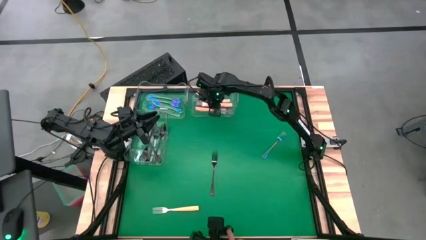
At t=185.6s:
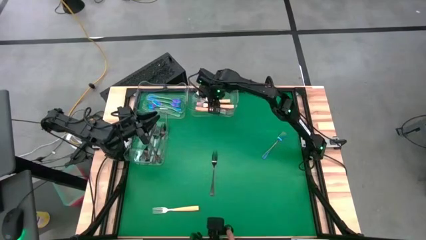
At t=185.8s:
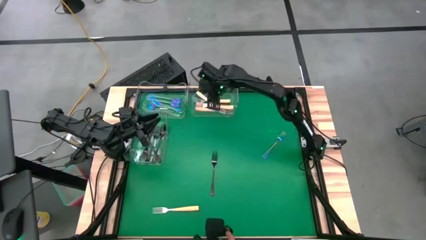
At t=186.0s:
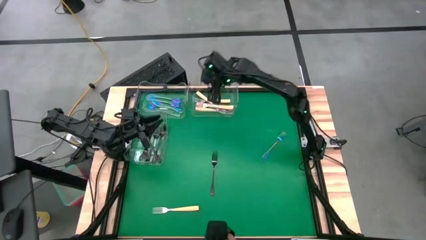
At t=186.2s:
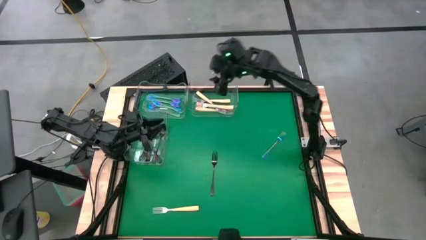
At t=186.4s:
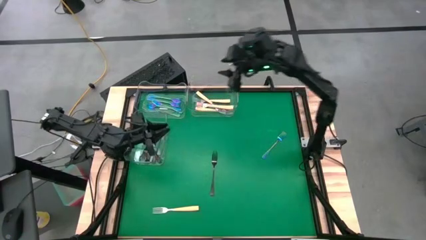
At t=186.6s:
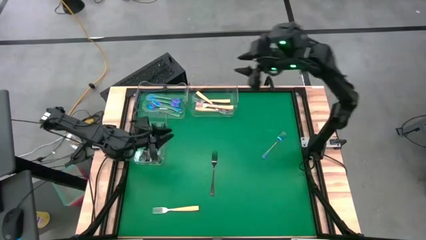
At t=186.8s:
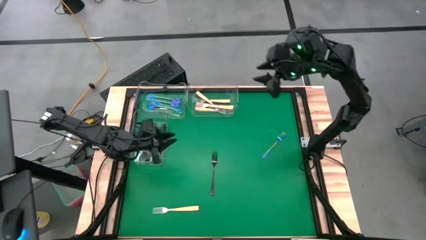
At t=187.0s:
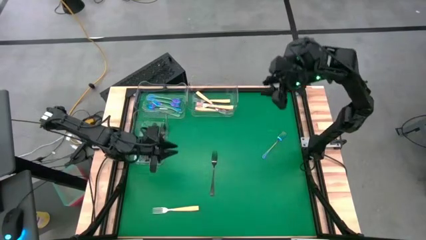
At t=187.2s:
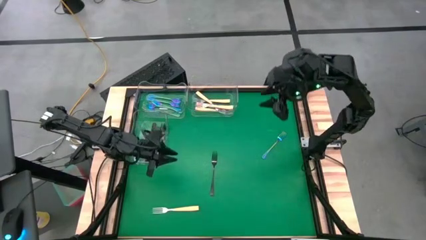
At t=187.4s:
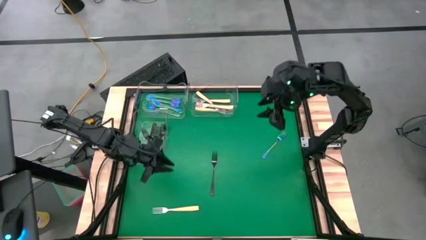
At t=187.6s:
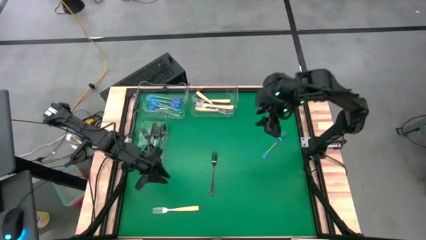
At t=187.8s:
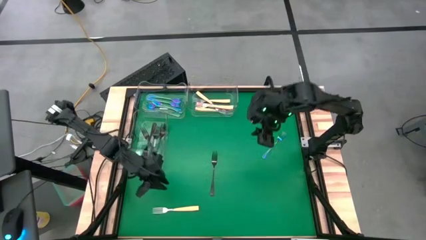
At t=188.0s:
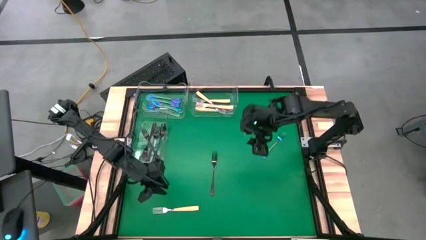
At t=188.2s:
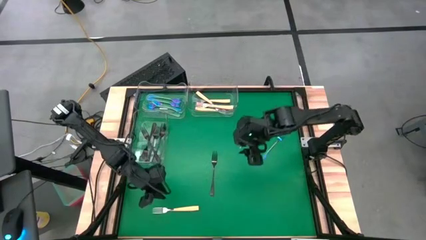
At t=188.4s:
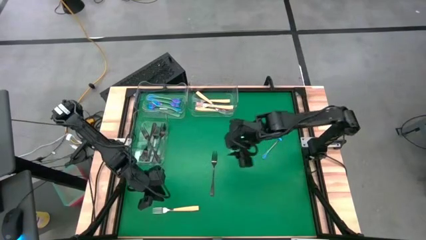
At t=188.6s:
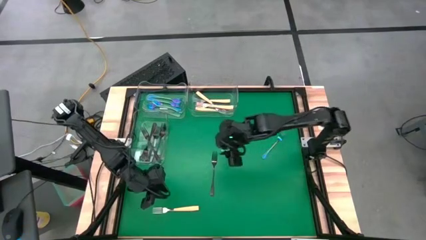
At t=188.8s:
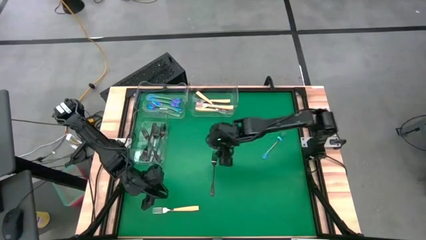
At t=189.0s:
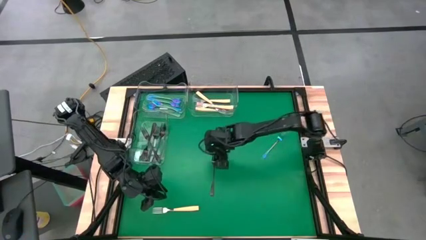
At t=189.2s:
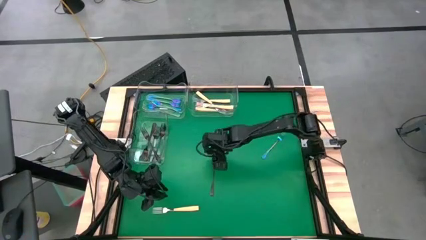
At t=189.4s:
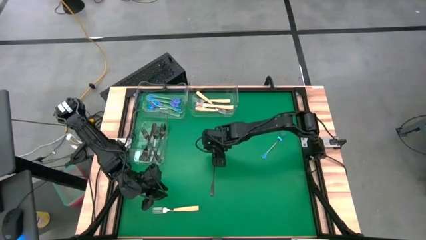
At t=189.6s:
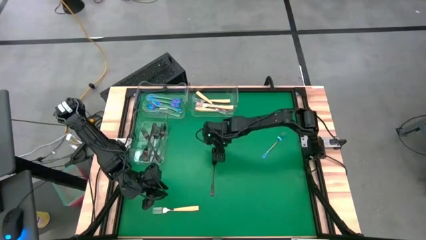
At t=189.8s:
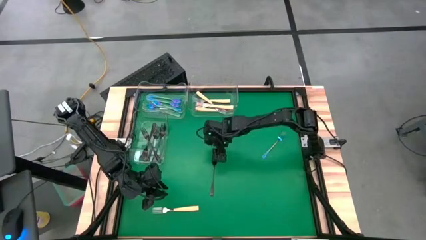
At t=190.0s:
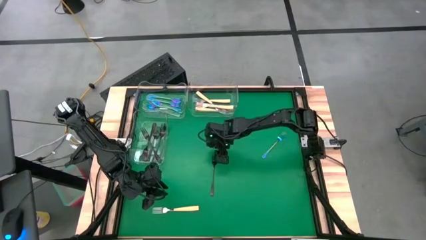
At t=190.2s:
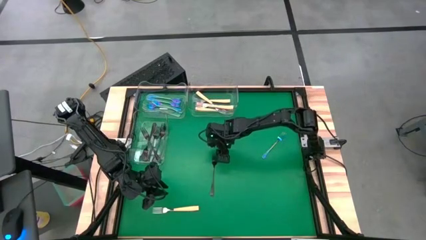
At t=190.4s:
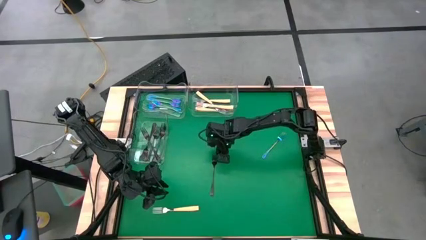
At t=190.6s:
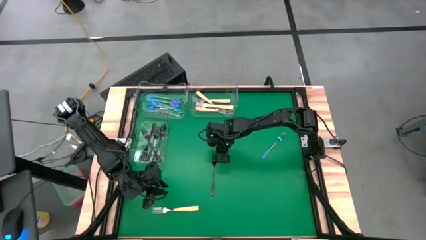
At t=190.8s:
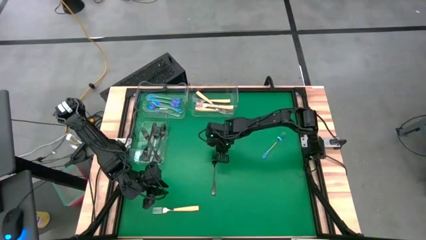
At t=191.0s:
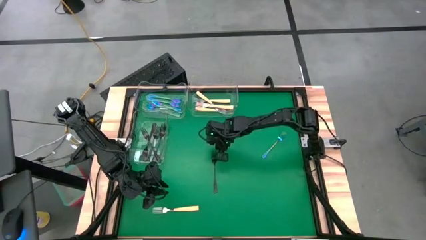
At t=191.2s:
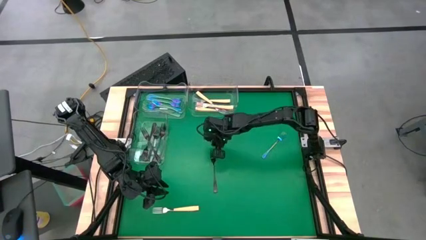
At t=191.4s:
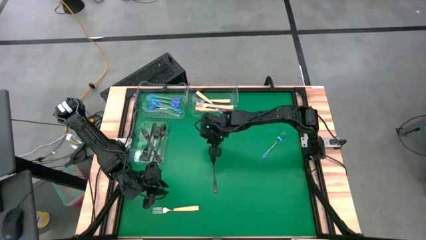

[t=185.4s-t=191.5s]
Task: Sort silverware by color (type)
Put the black fork into the middle left transparent bin

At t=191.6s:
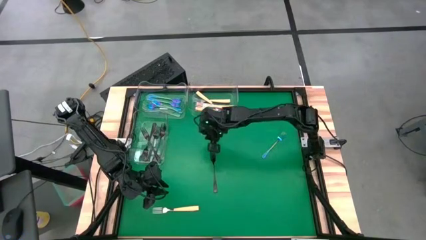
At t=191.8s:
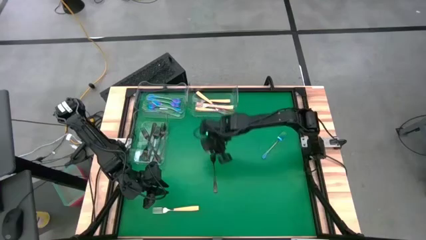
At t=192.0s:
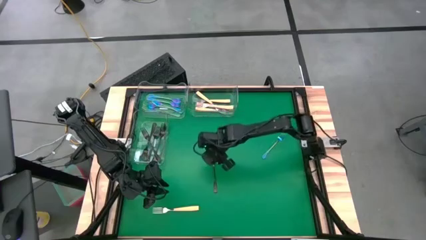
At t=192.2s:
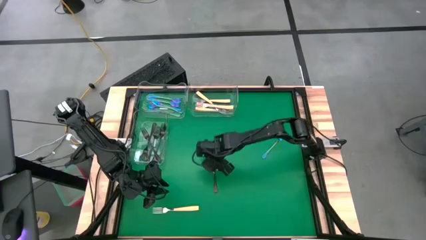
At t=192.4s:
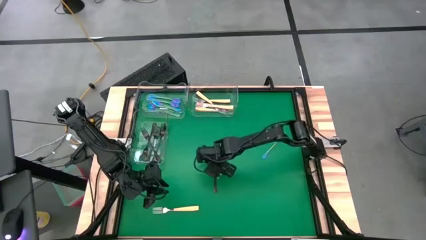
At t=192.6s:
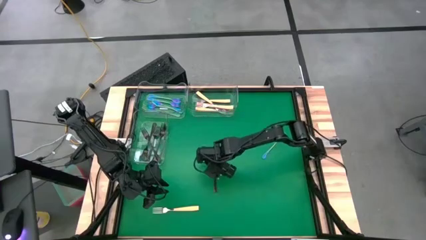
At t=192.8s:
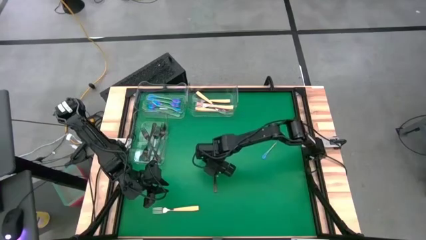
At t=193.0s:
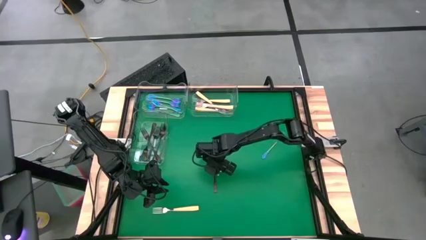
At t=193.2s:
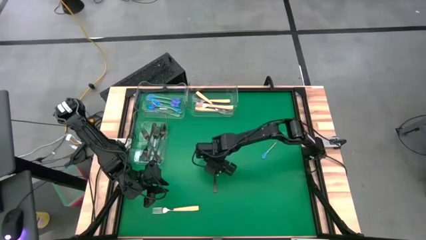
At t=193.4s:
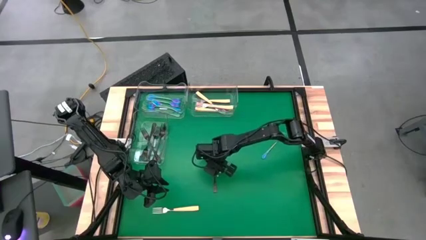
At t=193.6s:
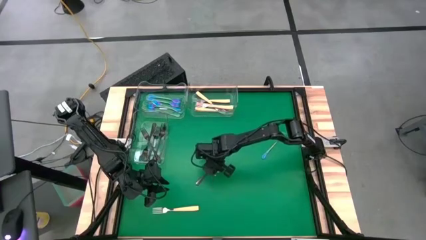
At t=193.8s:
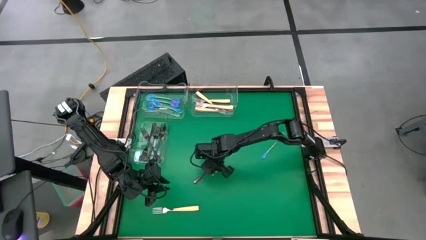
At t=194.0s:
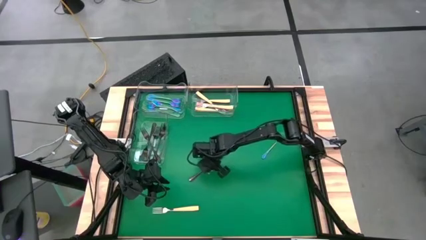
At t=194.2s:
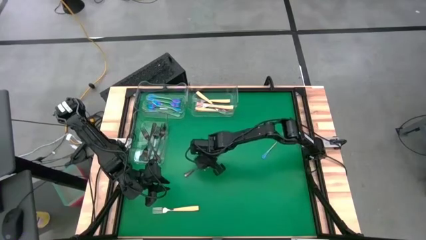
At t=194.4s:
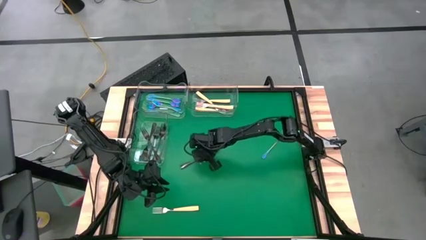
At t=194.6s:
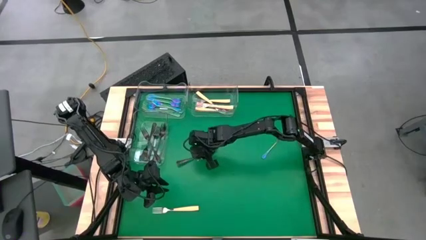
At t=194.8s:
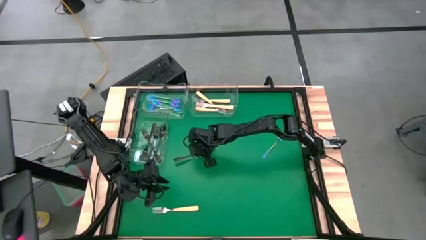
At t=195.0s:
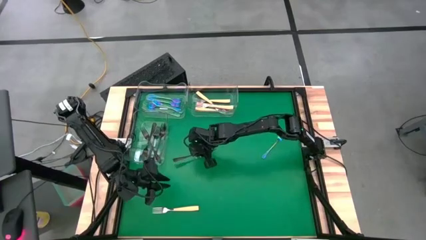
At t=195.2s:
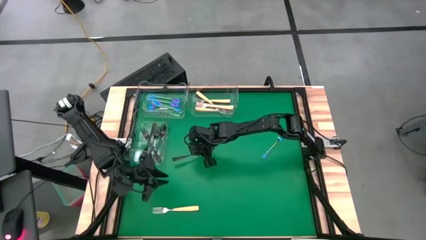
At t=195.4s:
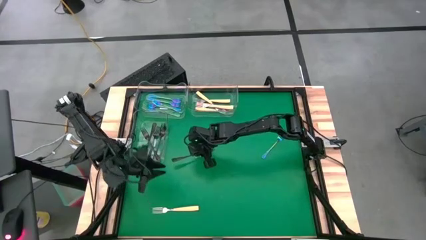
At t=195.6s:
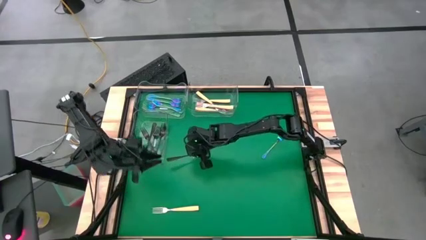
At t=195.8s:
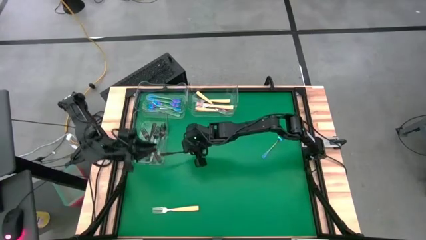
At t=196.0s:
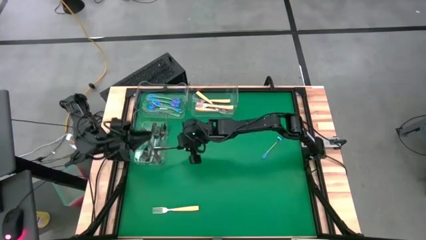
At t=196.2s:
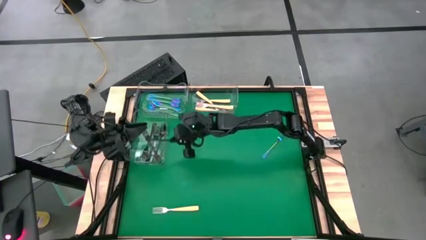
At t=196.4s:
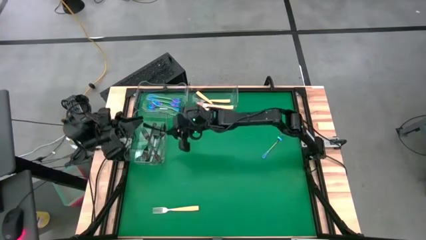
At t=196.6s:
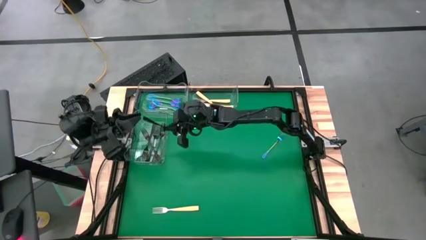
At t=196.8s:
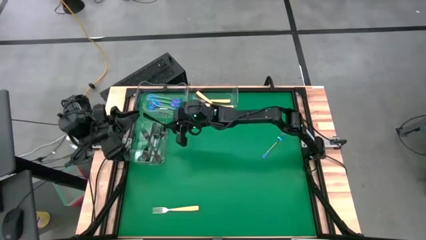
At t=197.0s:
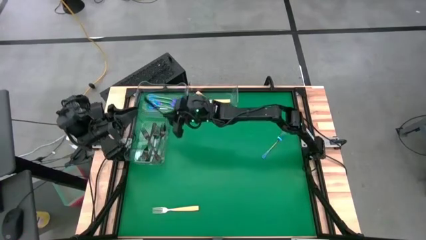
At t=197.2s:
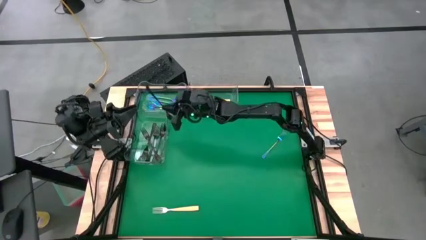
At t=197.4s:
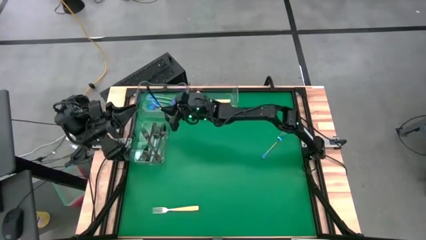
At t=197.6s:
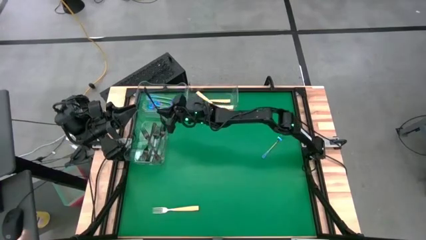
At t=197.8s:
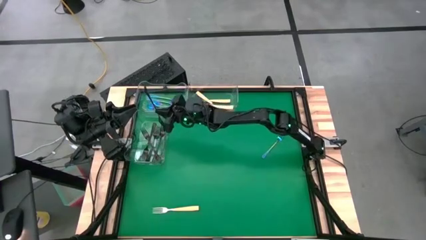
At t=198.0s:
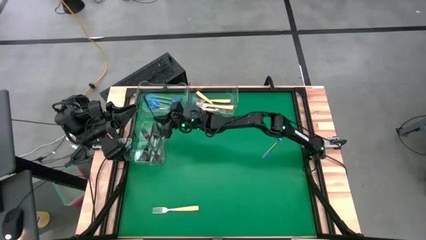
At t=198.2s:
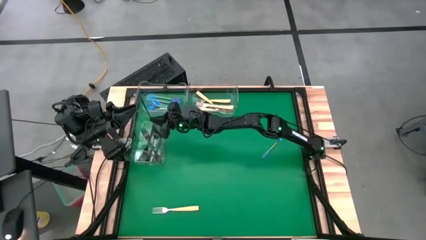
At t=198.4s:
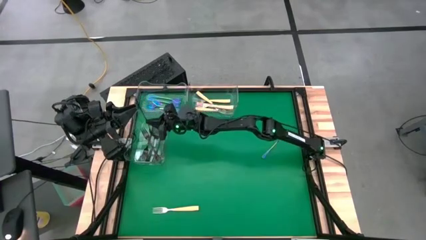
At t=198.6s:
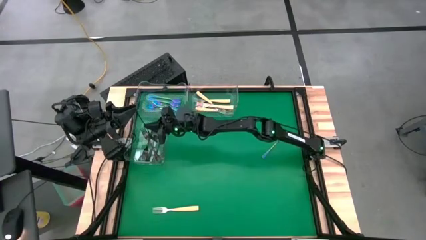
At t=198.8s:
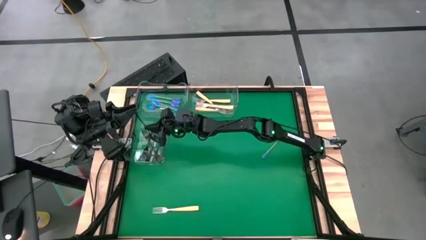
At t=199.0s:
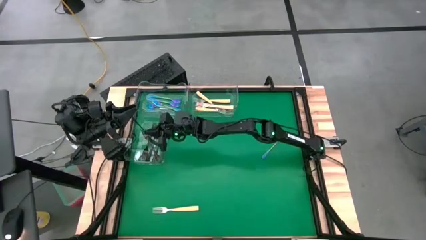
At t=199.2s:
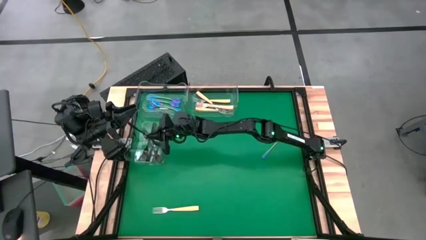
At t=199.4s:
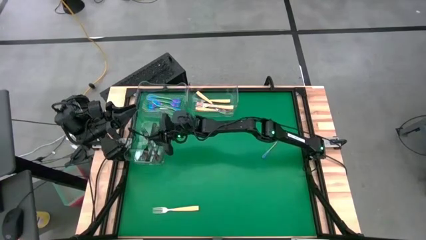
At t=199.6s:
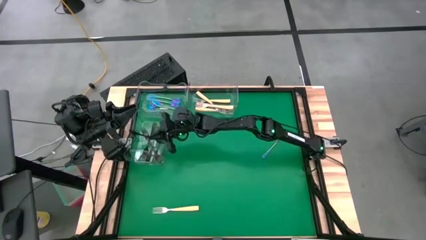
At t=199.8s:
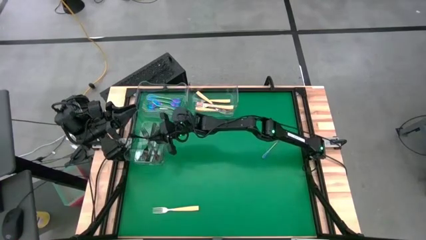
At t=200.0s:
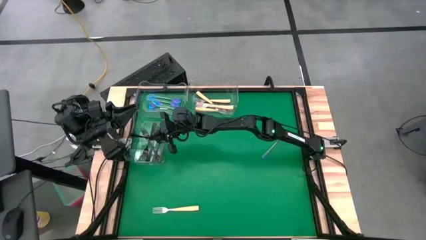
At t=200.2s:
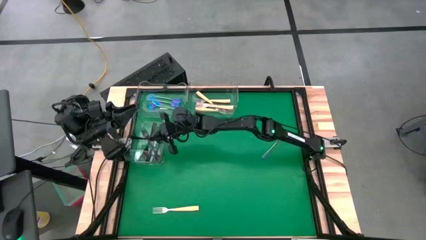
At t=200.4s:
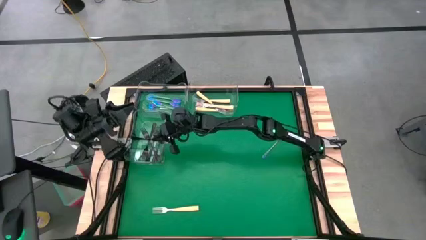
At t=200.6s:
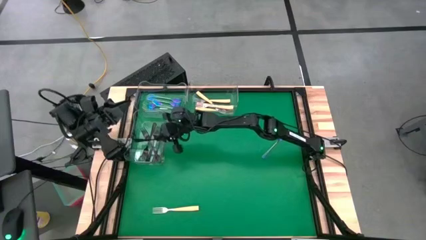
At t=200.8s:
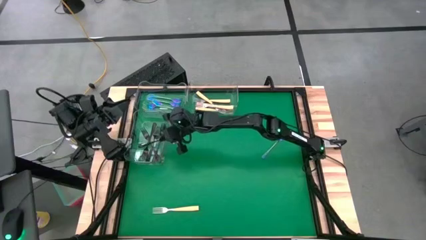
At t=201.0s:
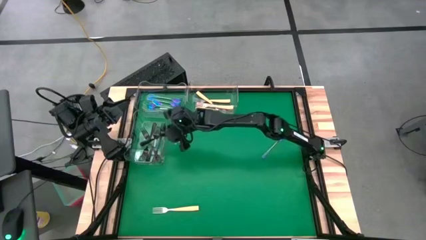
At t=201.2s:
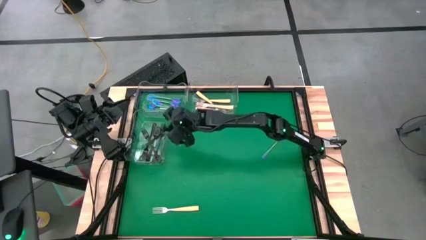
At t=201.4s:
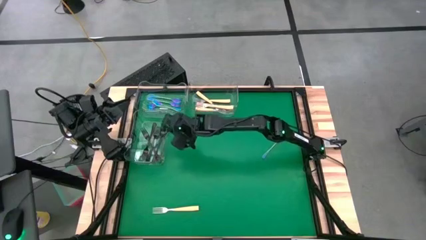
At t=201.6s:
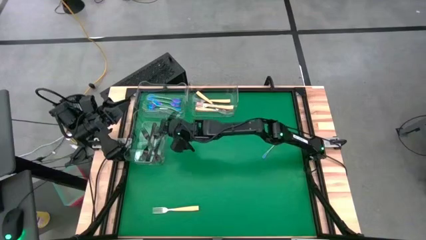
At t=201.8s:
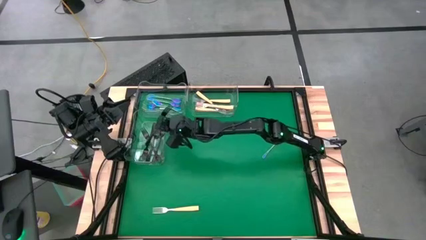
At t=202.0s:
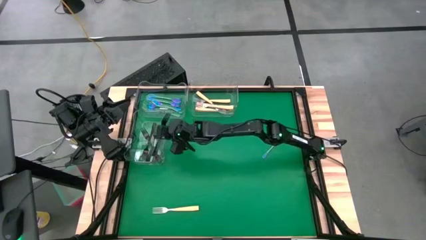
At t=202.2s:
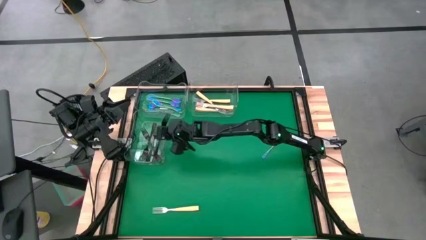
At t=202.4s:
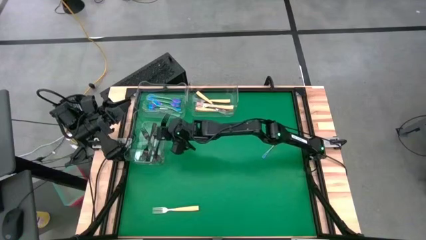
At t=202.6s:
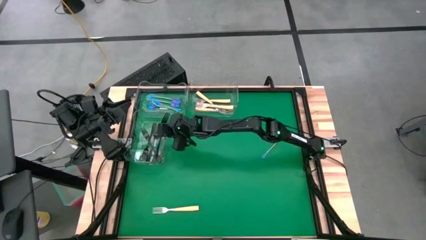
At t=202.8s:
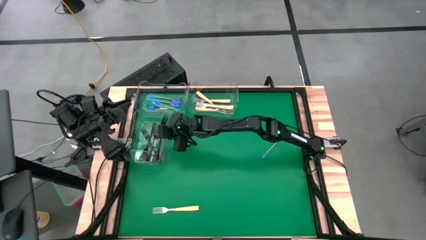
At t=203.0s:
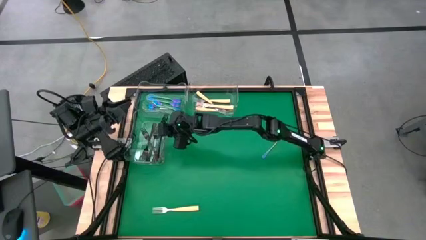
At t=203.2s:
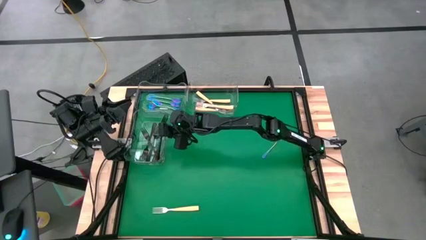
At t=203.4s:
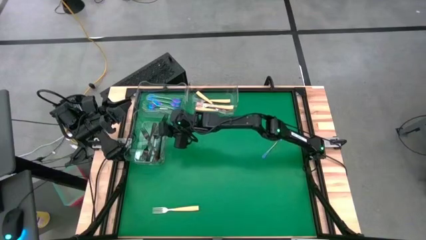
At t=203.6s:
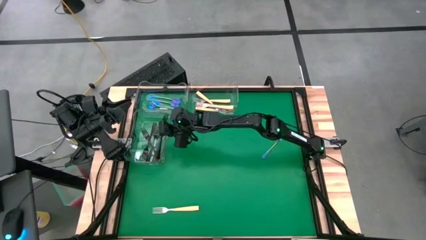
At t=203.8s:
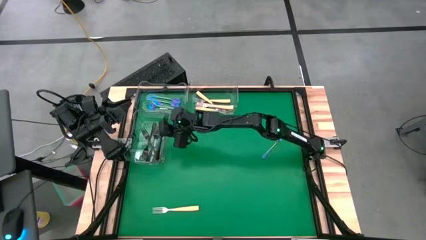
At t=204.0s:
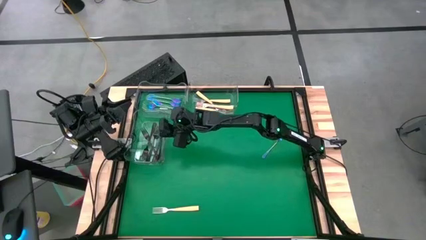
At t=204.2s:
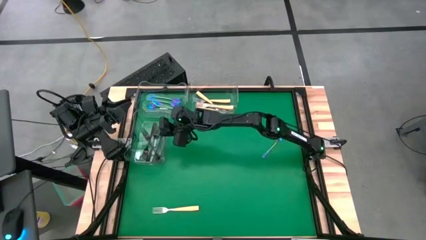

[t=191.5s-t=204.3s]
Put the black fork into the middle left transparent bin
